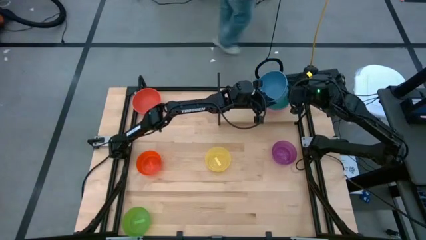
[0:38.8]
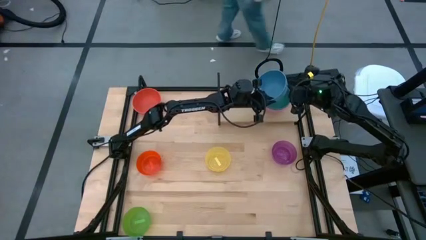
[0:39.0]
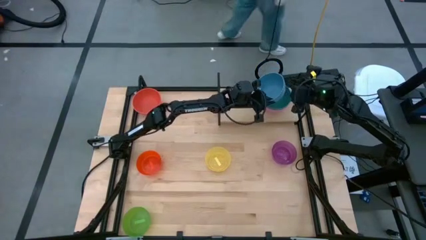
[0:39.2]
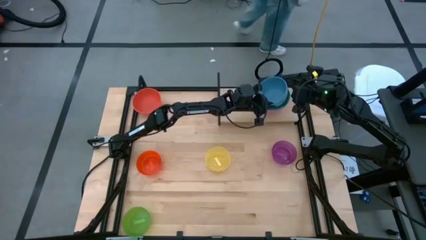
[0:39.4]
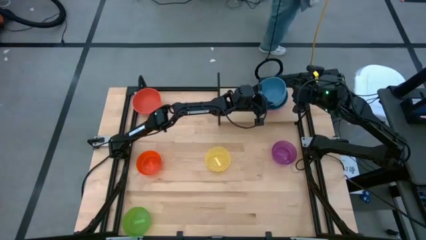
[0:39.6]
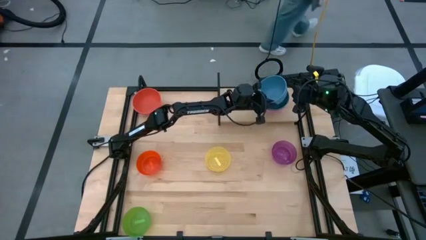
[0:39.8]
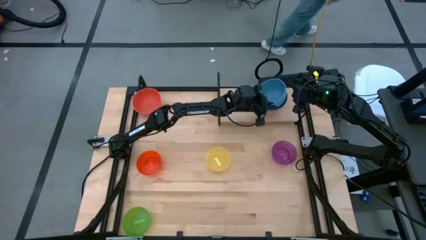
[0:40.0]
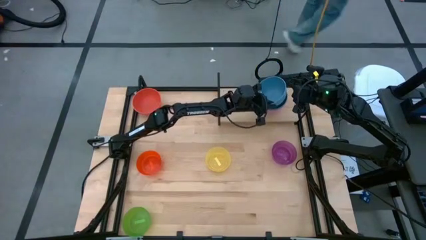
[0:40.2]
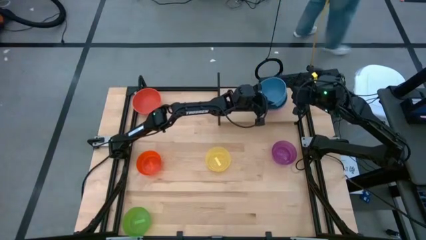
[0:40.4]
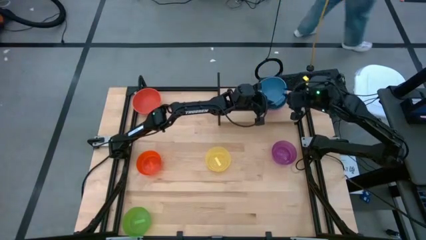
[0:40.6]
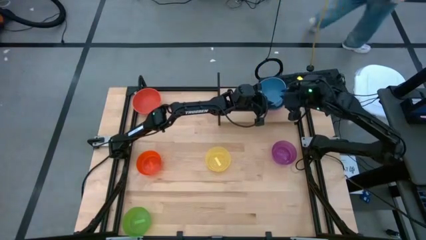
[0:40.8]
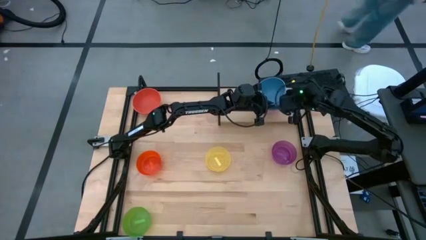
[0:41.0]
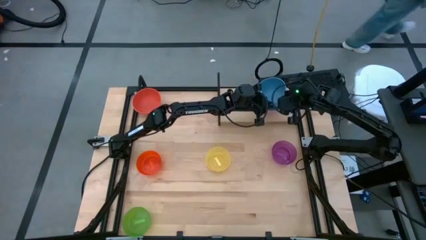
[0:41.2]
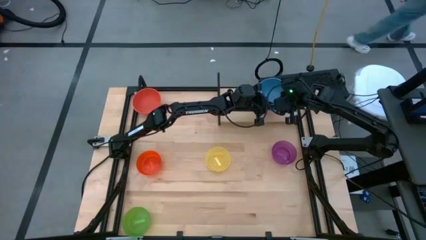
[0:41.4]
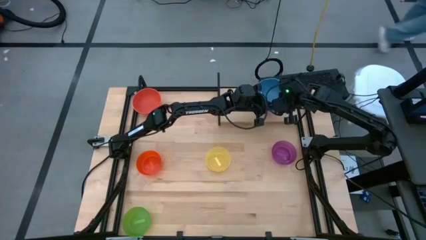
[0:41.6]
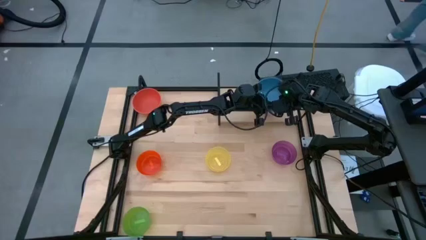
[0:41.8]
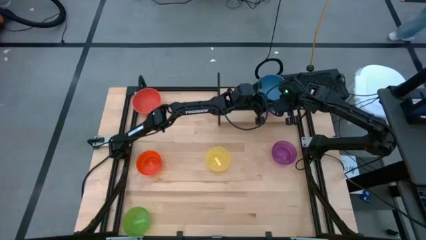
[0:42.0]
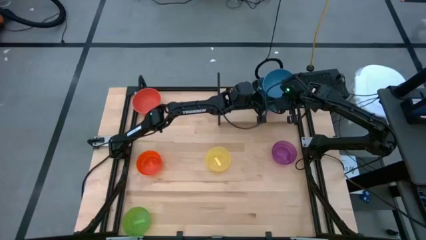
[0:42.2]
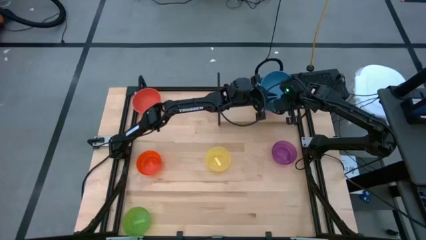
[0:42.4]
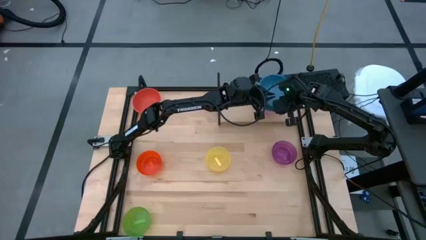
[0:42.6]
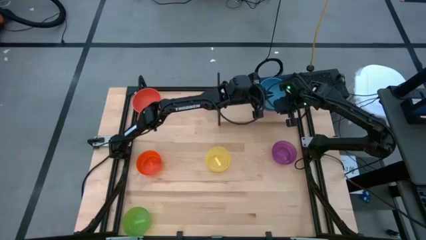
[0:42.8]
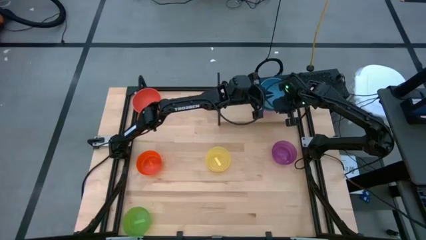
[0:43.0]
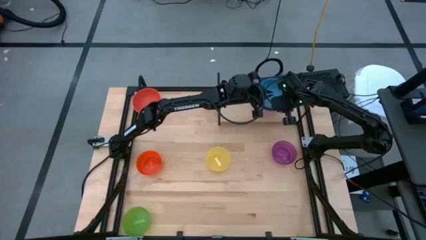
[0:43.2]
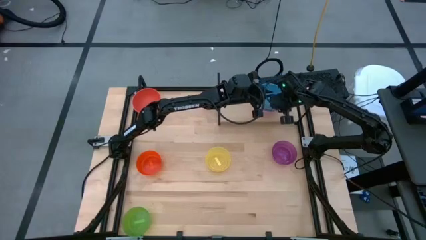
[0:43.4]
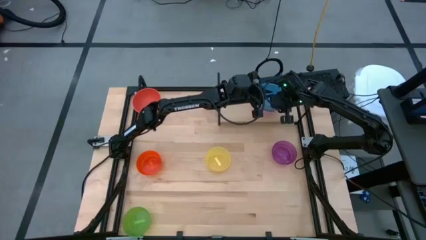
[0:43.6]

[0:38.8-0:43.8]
Task: Place and stack bowls onto a shelf
Stack the blue bowl on top of the green bowl on the shelf

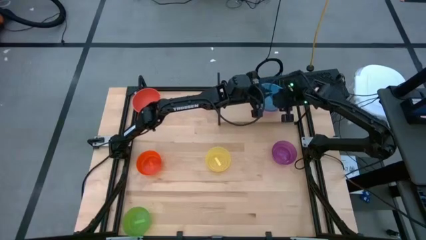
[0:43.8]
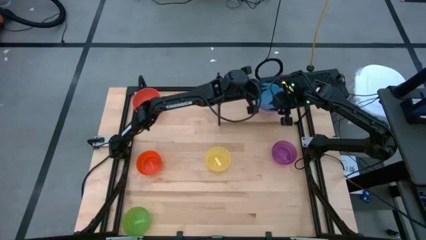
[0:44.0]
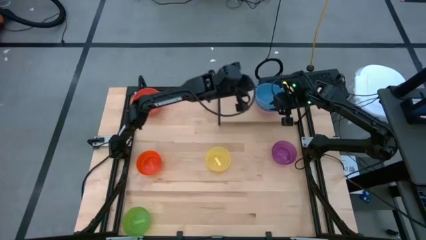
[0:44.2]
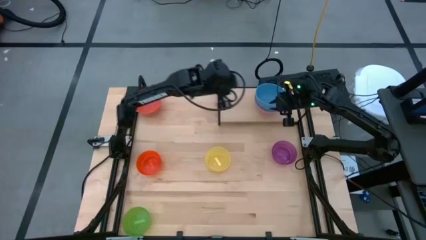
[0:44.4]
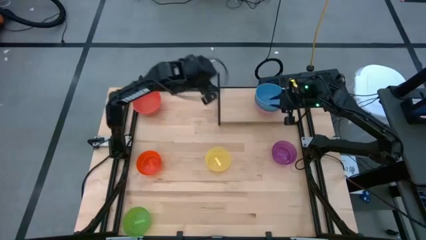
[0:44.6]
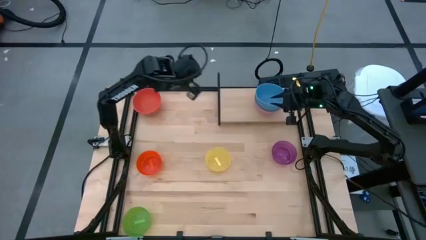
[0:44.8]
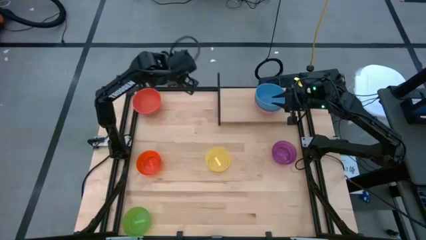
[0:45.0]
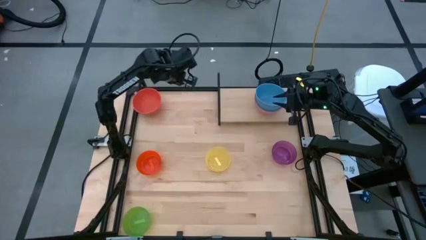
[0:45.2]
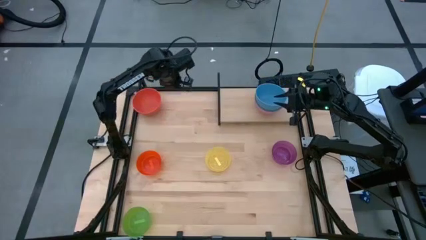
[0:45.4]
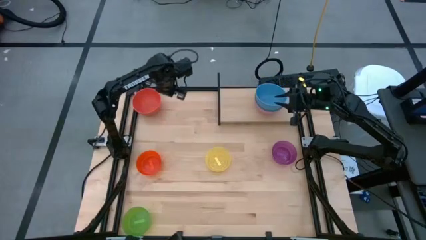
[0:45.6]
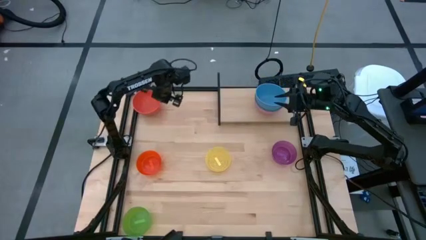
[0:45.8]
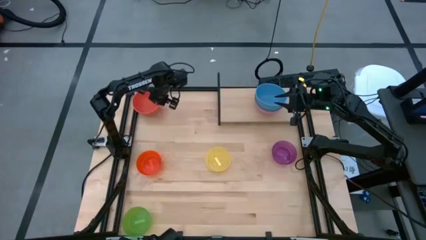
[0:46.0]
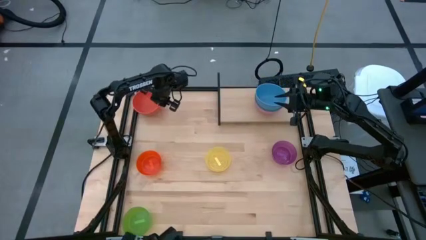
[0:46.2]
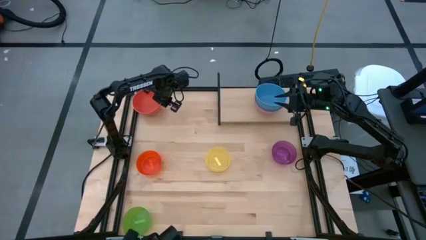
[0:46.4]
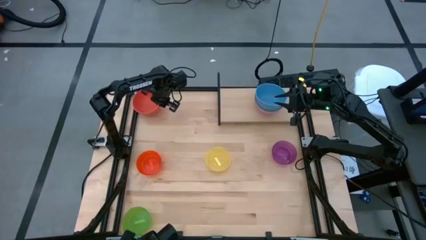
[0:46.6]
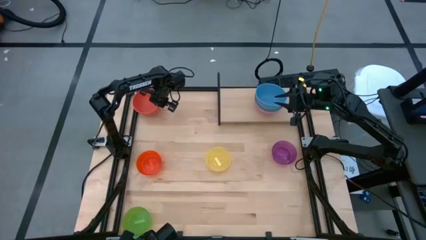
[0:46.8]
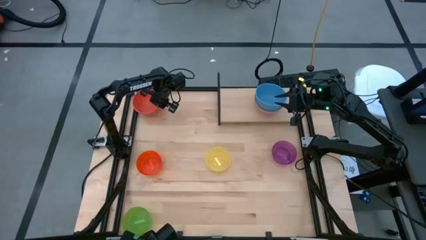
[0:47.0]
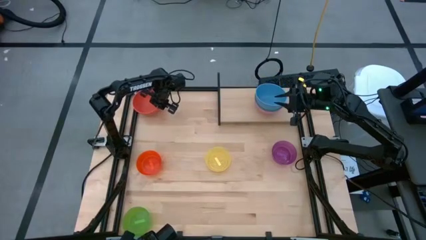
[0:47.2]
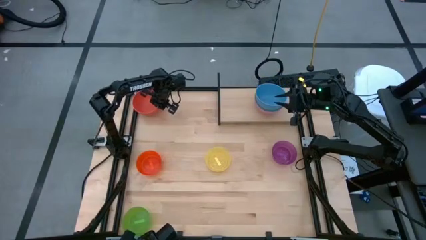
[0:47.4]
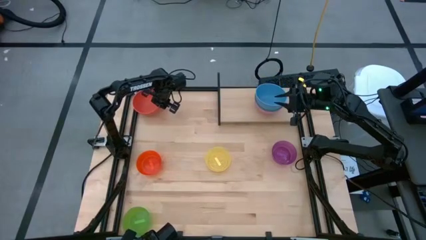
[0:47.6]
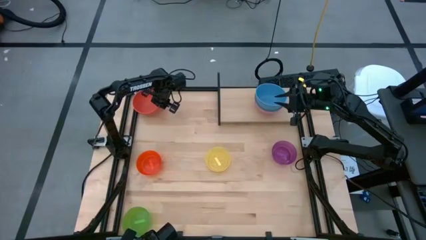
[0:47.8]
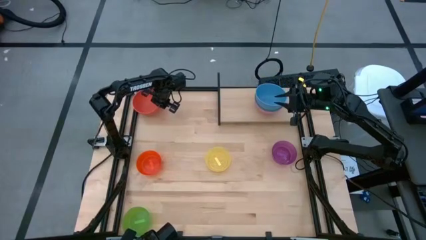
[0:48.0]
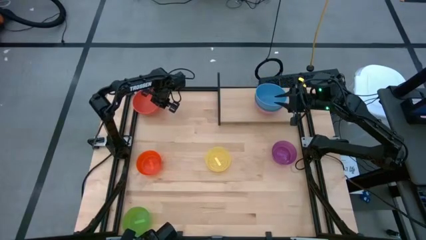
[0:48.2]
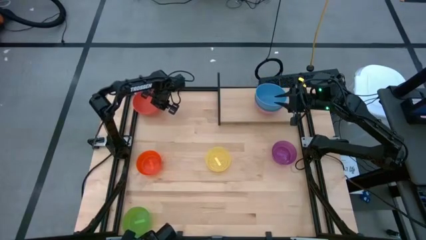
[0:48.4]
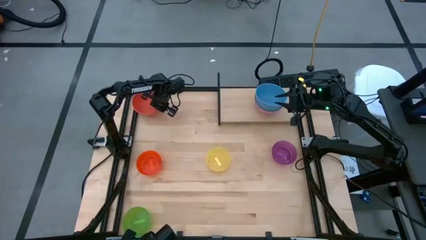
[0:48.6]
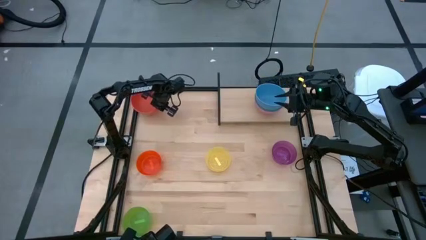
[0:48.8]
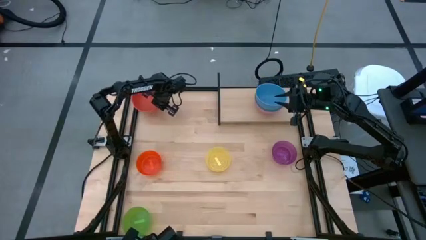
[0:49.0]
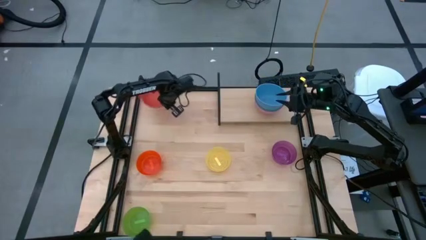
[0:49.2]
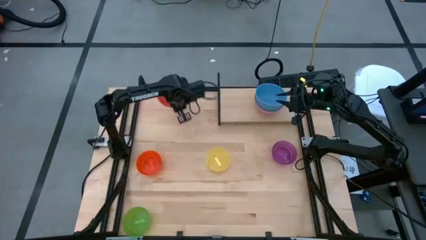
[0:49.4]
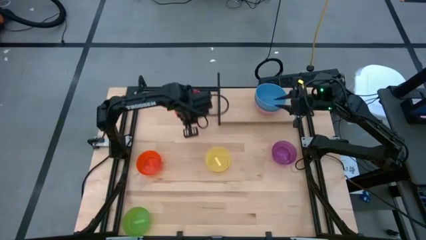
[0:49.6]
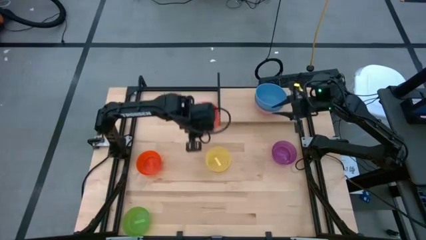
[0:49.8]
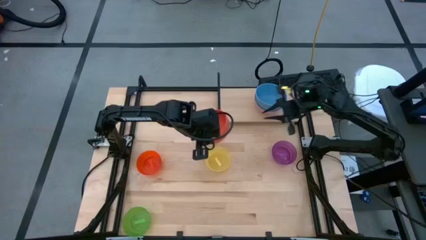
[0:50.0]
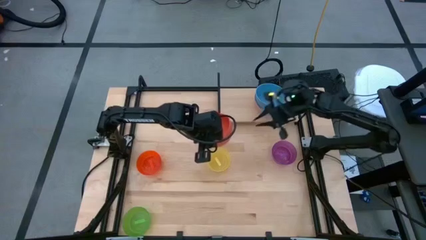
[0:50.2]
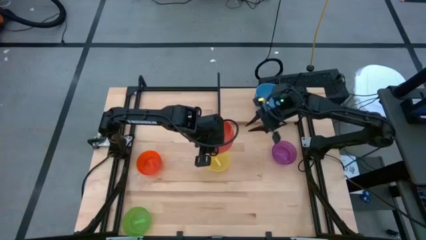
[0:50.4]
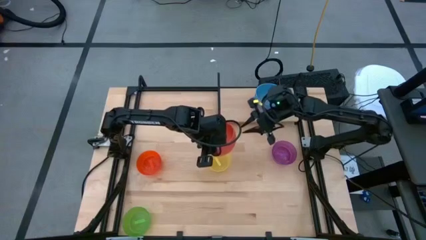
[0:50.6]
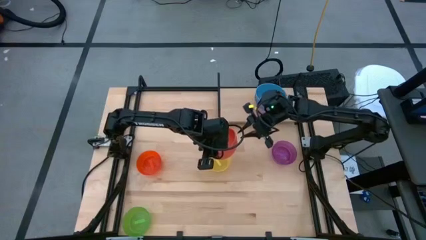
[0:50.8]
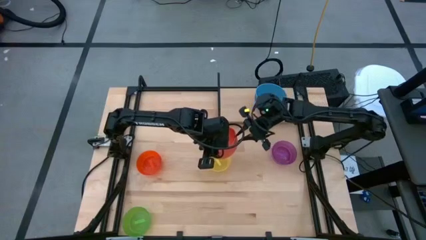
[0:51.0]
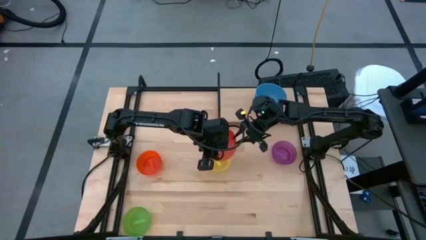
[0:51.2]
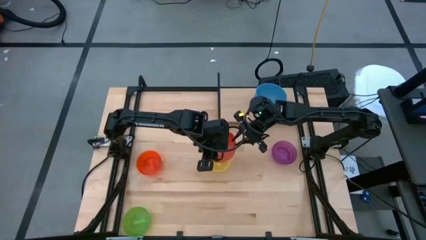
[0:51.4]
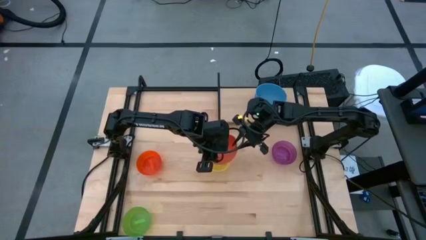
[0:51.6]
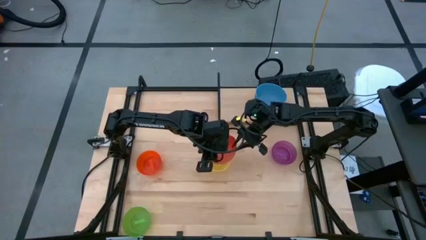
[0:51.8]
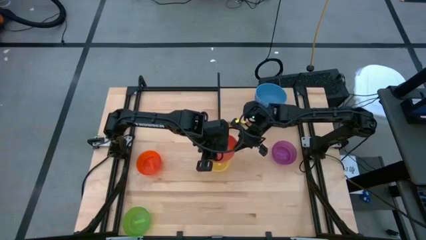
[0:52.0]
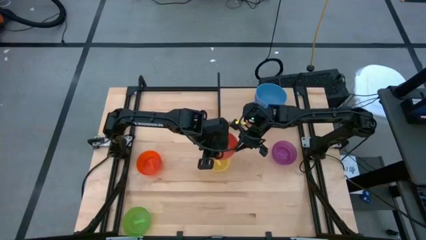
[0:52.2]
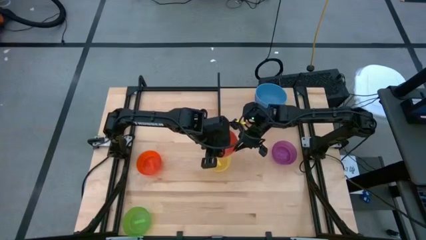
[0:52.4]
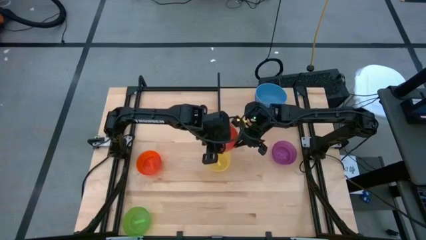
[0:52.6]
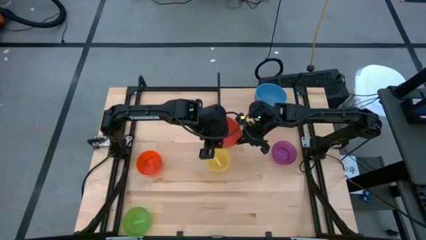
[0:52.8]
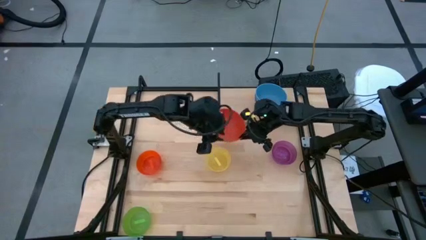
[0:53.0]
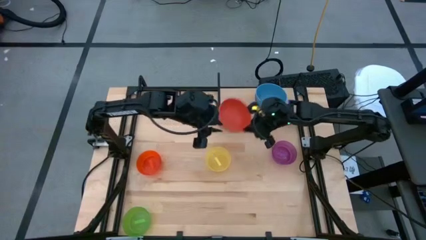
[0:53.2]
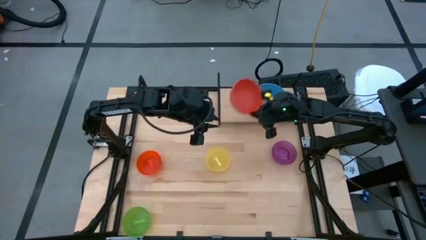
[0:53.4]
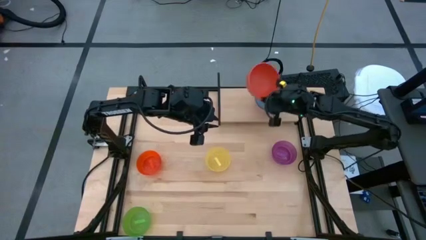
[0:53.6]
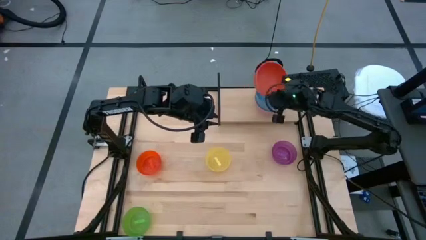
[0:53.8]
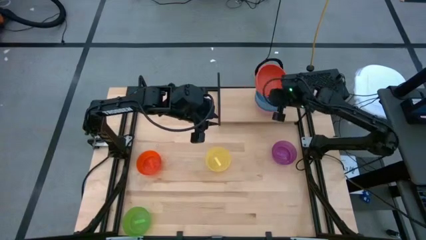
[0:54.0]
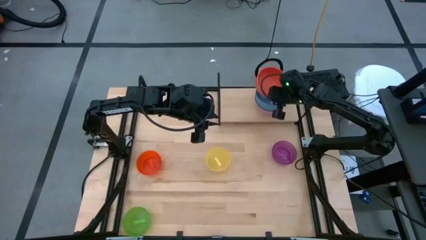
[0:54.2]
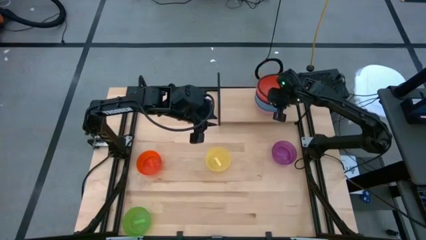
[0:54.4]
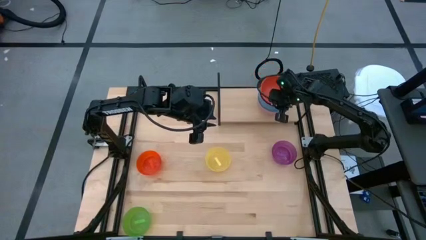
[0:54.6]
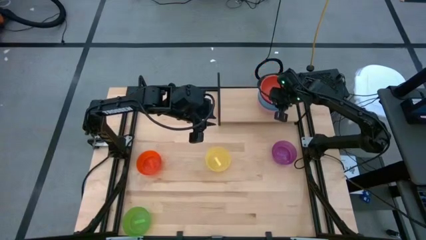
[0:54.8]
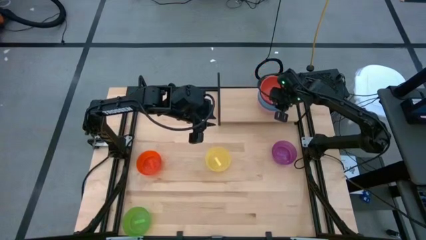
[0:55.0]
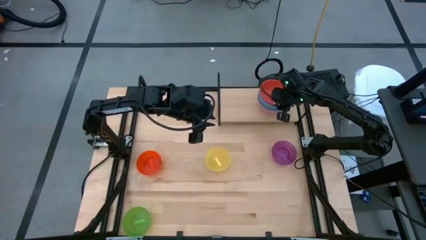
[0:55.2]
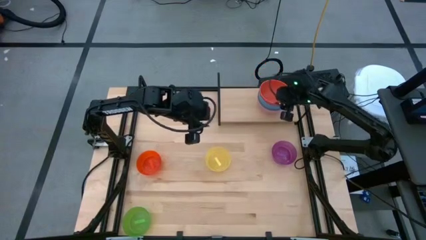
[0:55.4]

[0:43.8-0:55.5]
Stack the orange bowl on top of the blue bowl on the shelf
